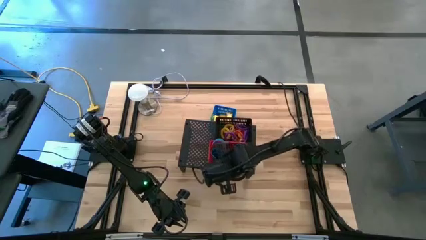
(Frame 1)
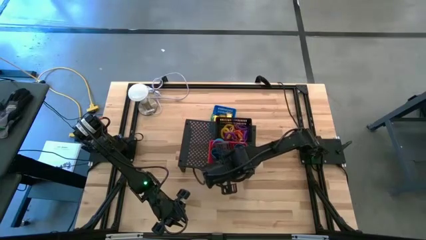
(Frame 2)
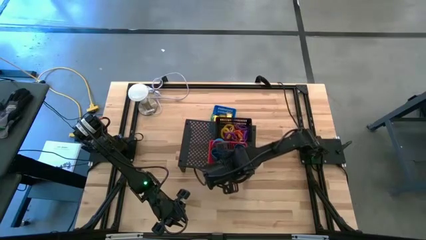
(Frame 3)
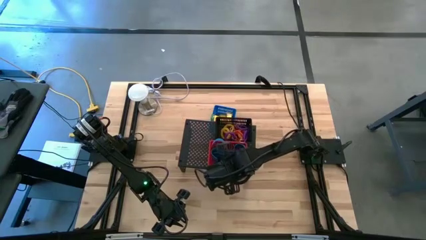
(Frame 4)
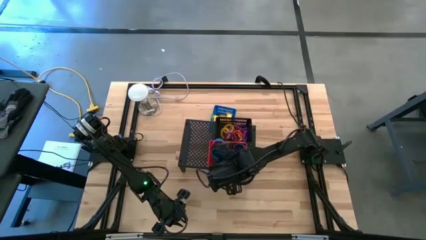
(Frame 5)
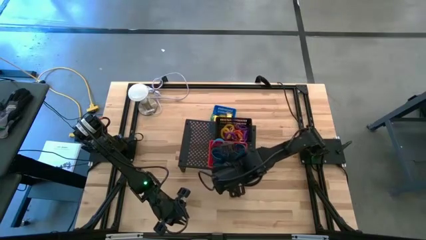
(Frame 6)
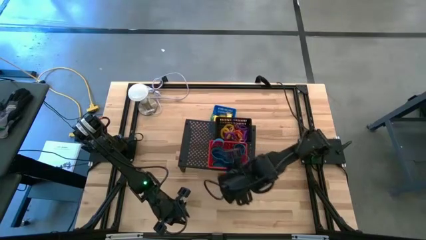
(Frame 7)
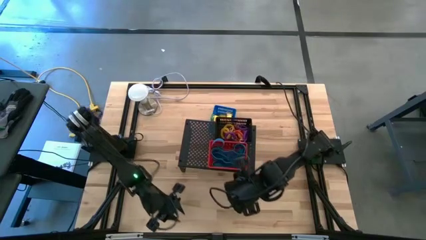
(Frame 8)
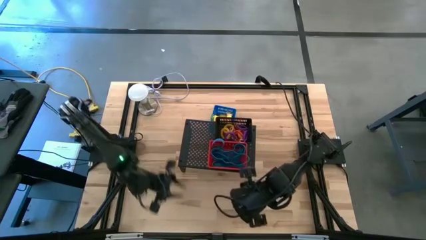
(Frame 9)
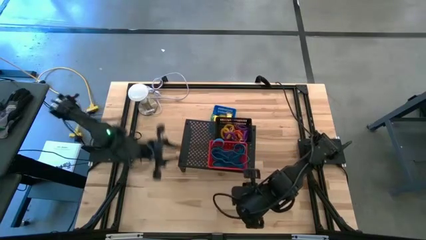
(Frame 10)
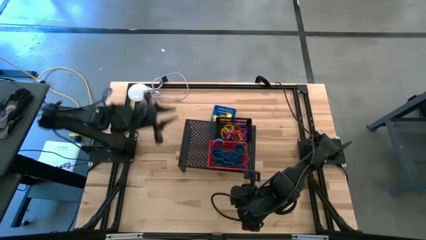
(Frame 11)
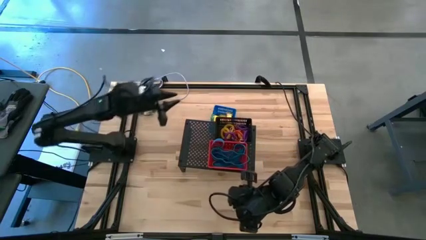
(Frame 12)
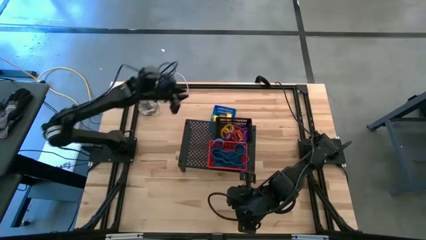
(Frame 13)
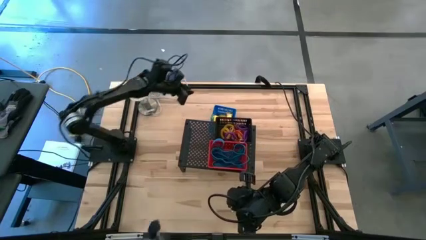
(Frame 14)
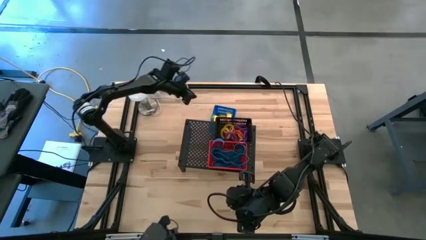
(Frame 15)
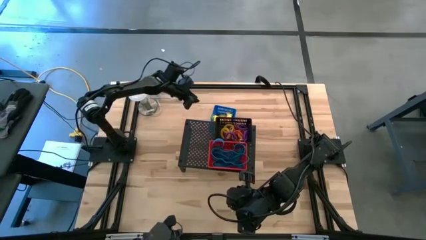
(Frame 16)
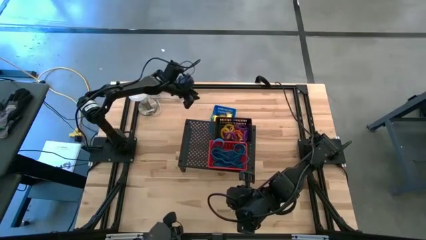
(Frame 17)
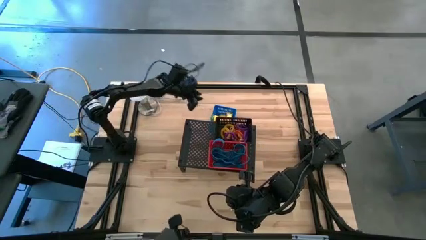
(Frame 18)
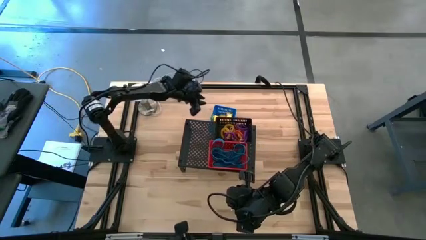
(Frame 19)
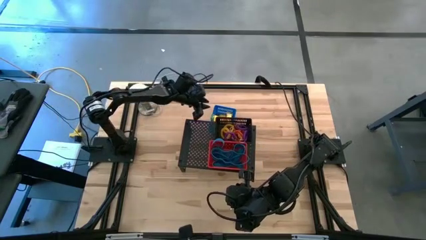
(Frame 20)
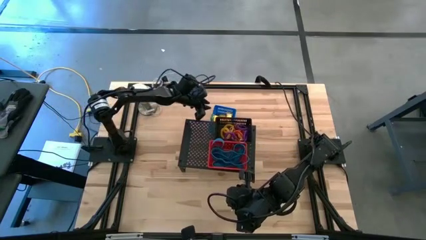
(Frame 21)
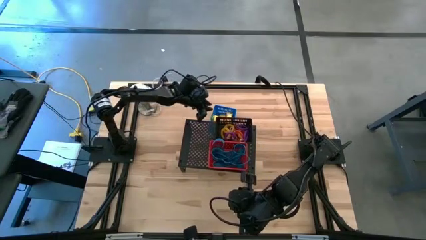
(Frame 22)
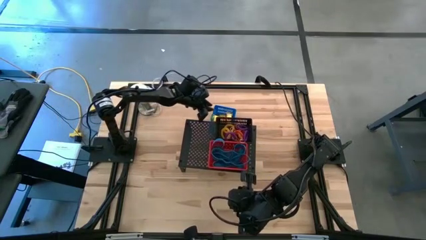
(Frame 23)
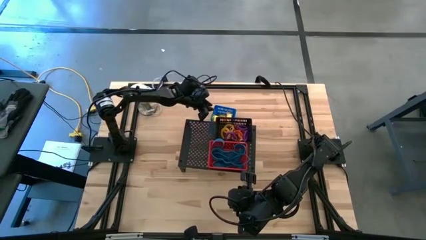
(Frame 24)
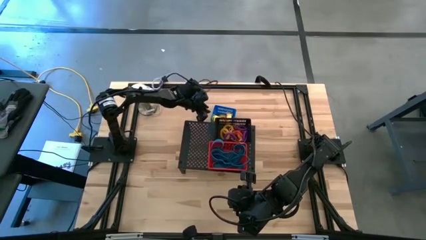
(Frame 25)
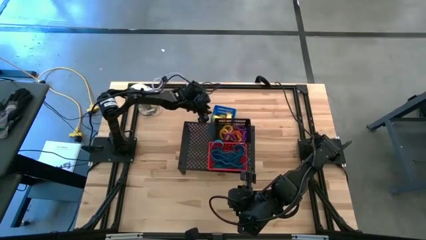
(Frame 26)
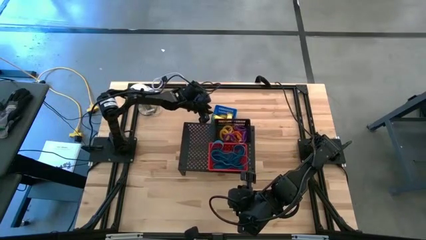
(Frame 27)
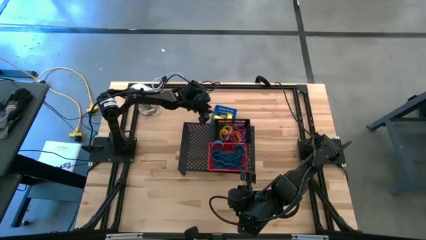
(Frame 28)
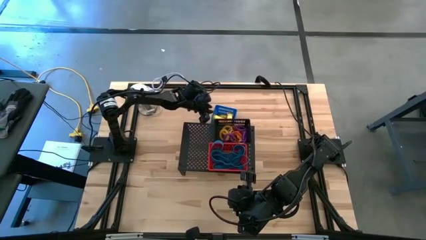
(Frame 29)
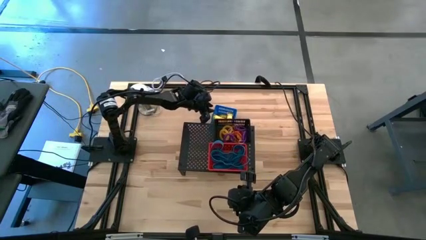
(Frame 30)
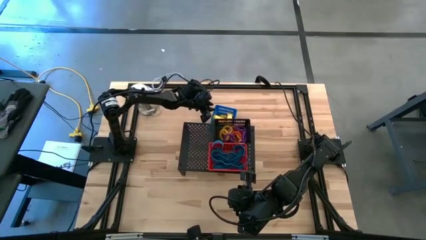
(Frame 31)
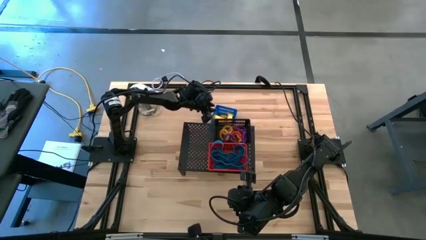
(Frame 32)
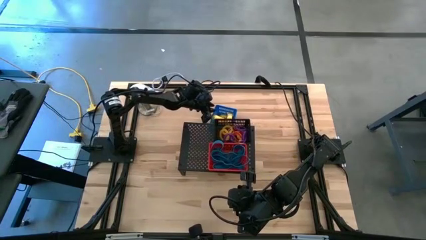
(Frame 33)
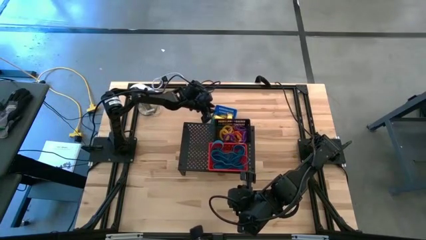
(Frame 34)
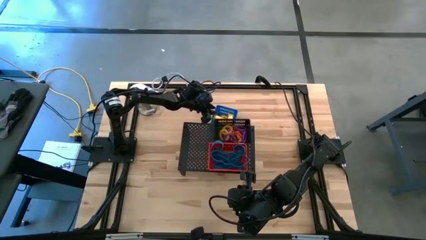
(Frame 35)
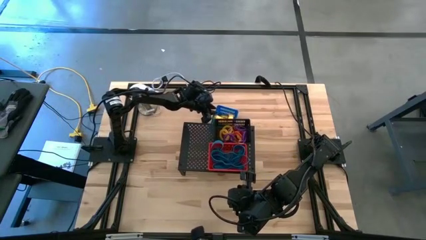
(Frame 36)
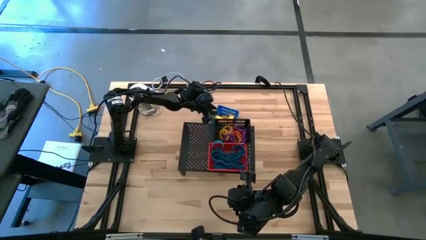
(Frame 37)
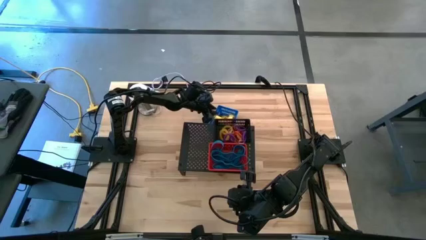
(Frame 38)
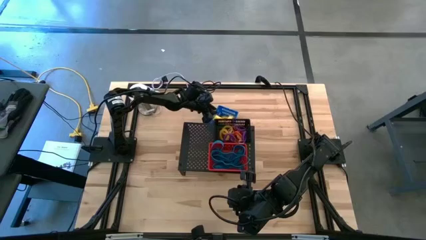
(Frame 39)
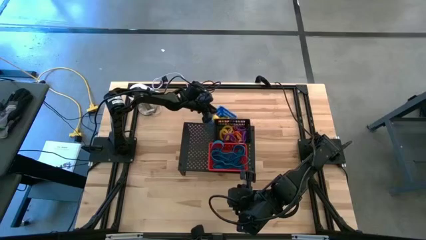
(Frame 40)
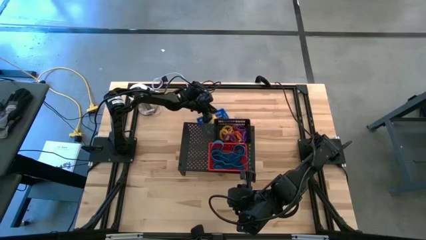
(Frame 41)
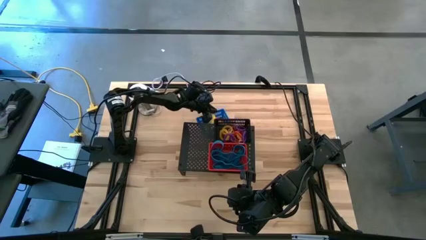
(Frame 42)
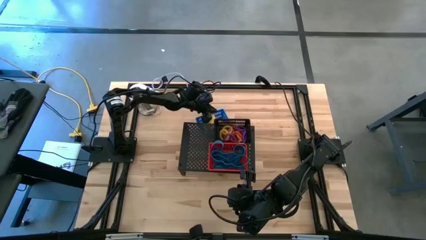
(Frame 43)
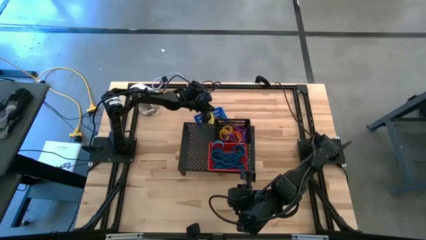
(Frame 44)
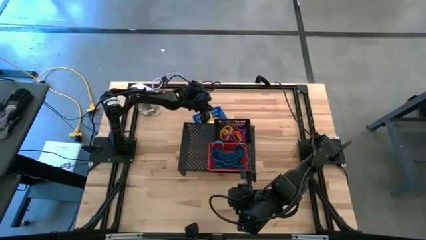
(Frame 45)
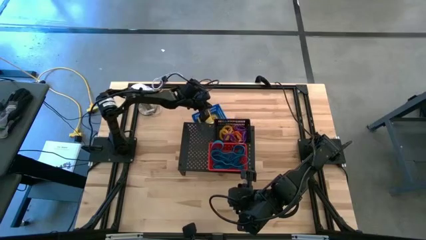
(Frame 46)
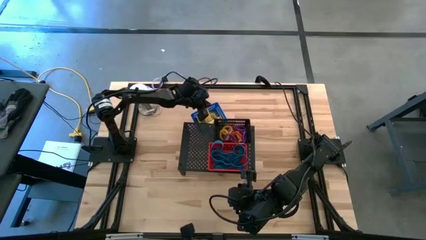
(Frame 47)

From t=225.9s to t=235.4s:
Task: Pick & Place Office Desk Supplies
Put the blue bin on the shelf

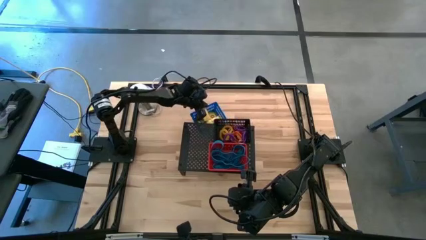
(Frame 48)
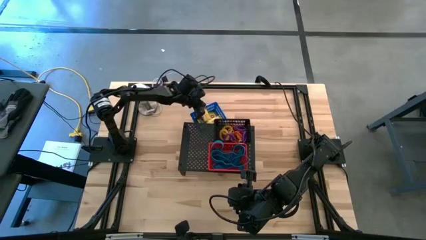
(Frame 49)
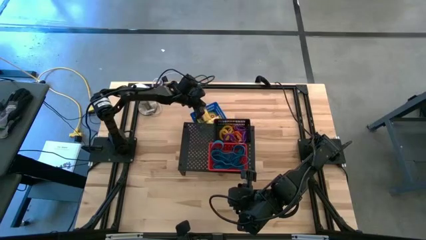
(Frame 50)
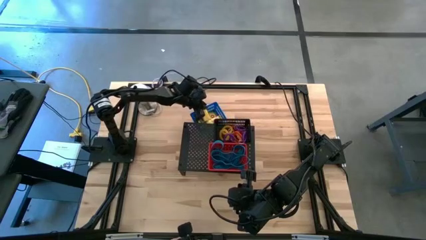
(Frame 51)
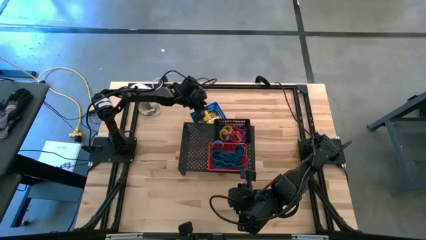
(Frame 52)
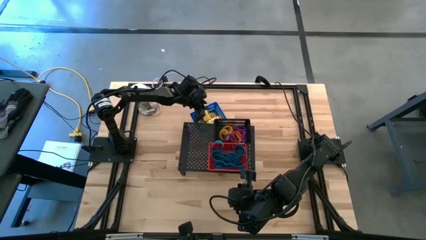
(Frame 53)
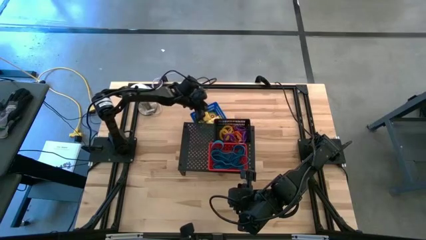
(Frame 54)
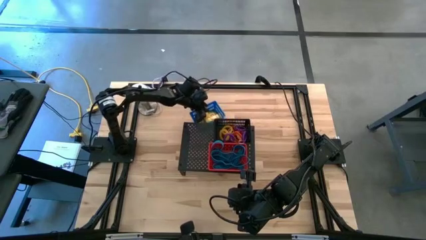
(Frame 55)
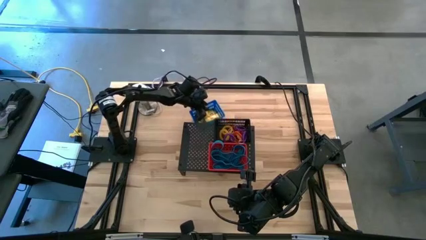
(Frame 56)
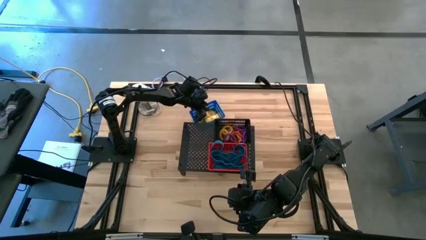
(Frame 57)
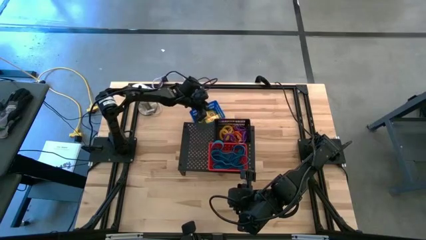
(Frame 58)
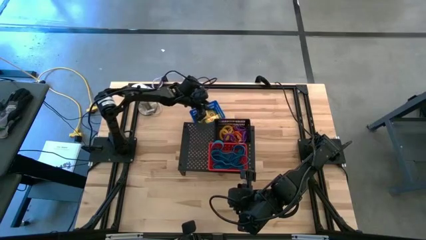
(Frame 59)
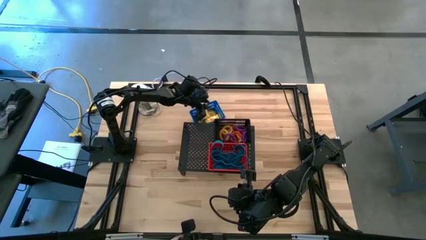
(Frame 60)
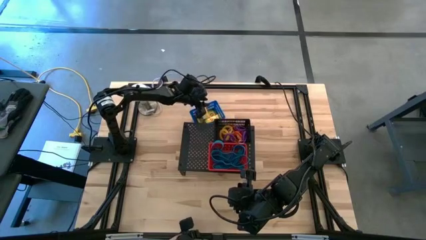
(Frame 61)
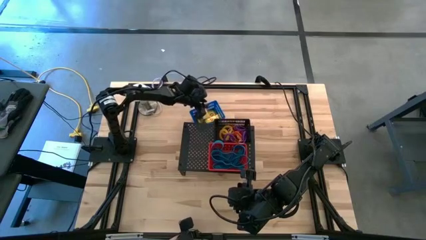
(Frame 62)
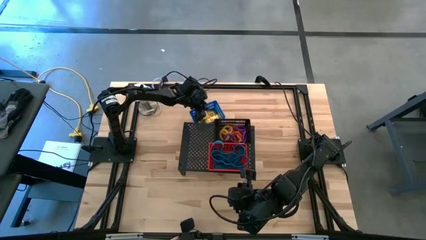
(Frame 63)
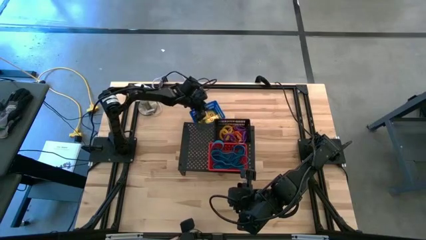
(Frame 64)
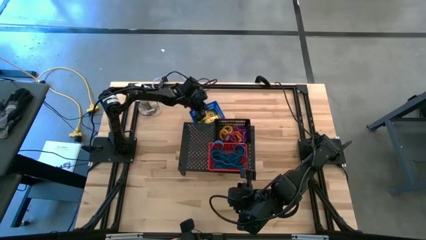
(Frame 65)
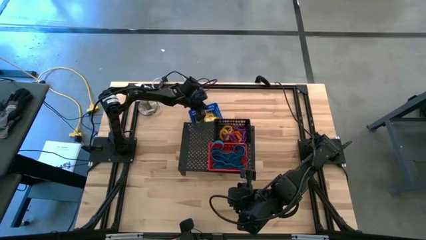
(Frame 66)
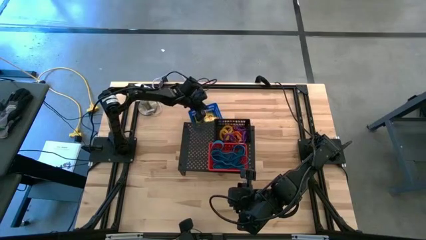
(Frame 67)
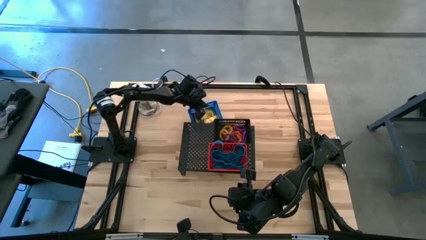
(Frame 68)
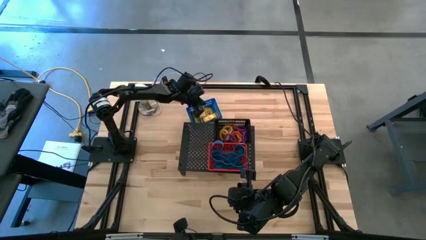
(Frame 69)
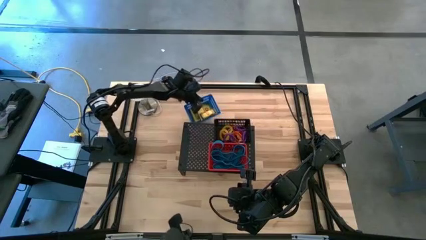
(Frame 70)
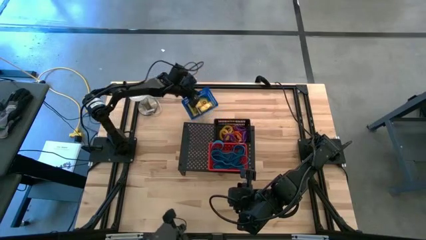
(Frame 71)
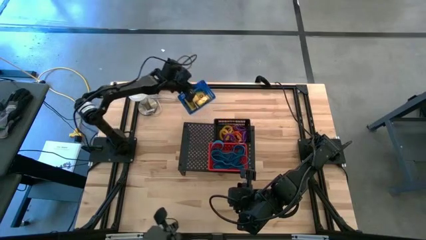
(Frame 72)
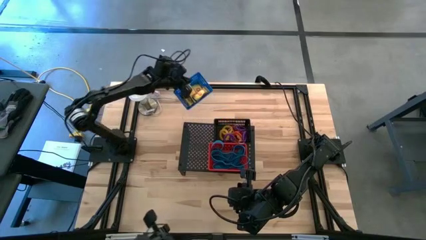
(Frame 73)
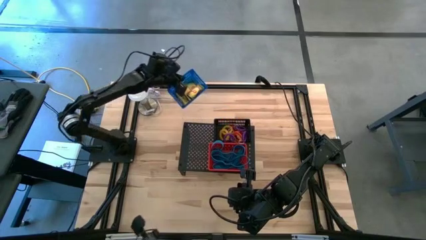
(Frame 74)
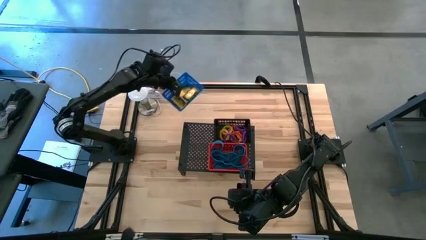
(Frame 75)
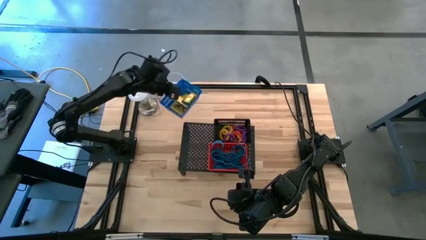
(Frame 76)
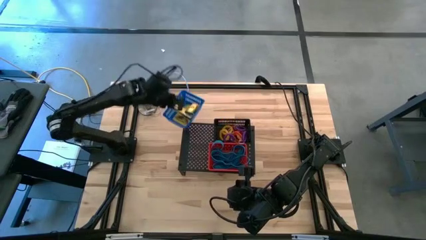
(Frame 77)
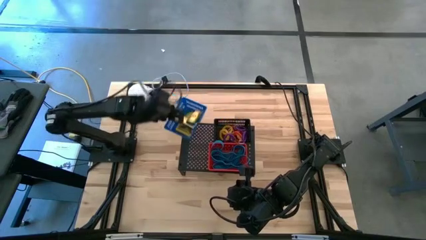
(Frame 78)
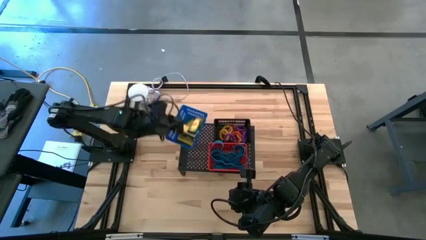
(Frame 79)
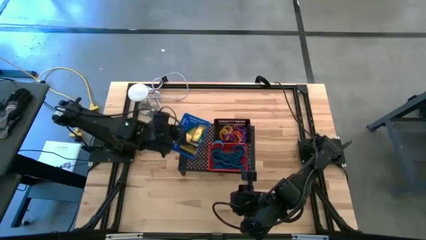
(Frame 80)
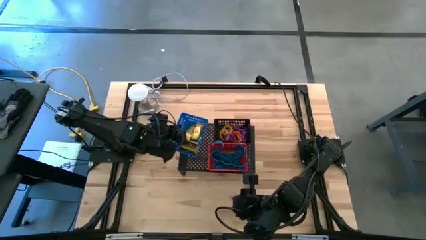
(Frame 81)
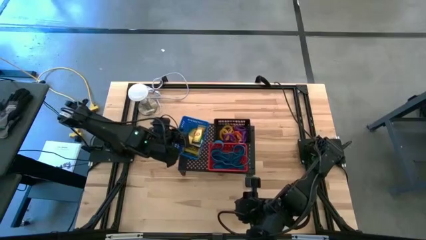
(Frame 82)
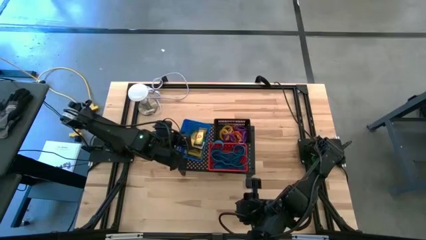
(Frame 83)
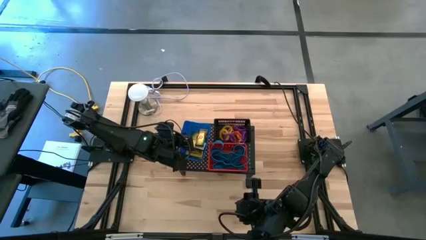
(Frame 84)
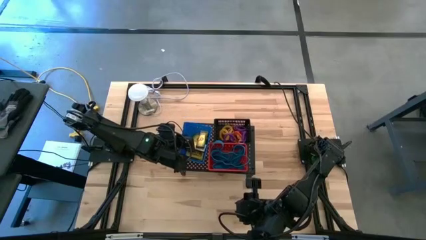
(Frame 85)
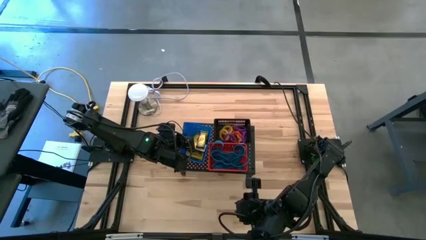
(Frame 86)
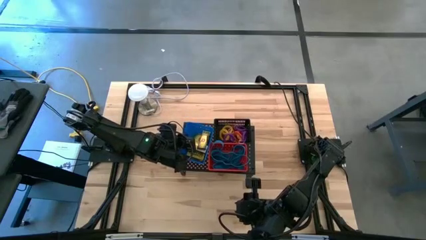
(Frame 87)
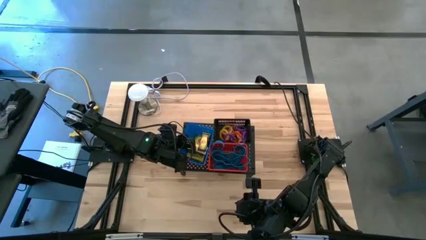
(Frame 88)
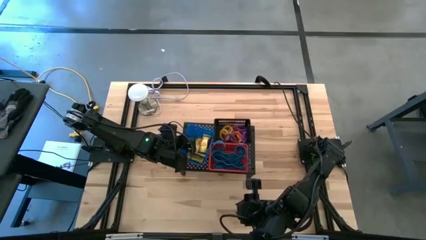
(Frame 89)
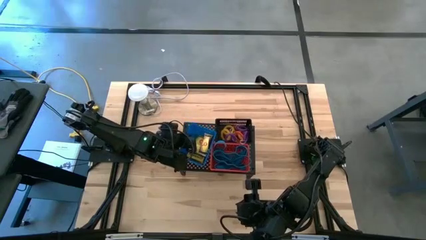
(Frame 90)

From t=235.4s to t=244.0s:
Put the blue bin on the shelf
